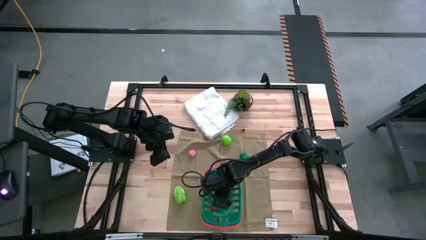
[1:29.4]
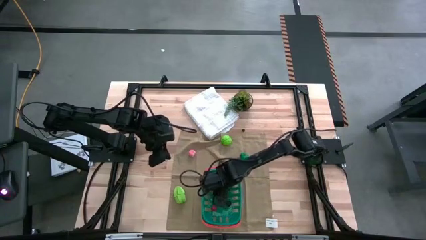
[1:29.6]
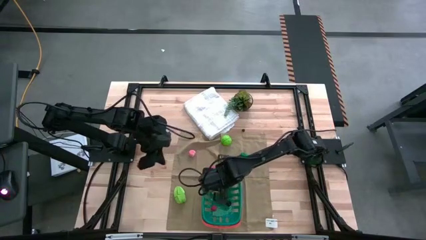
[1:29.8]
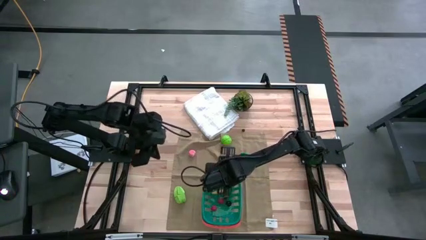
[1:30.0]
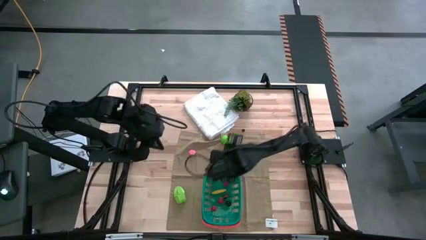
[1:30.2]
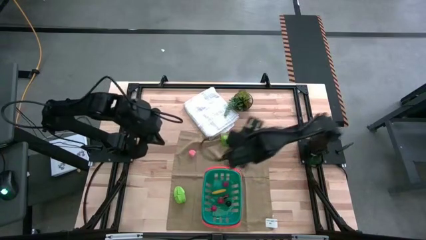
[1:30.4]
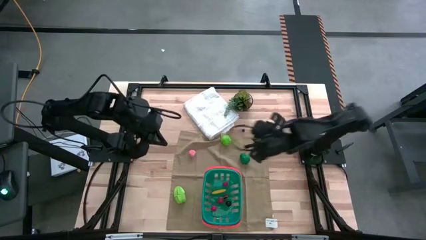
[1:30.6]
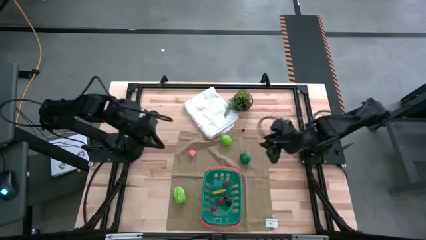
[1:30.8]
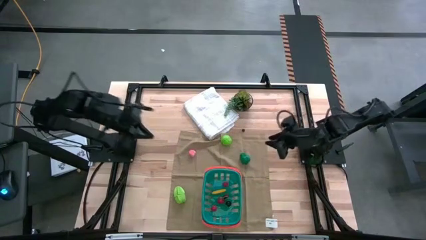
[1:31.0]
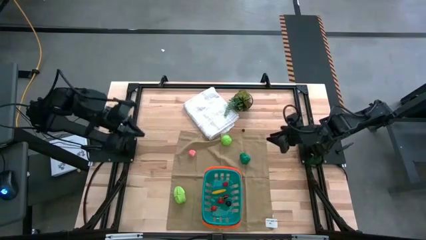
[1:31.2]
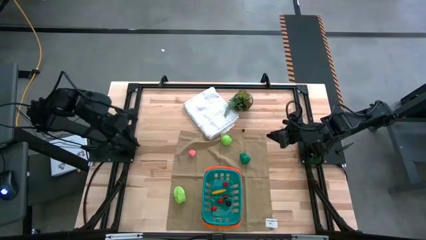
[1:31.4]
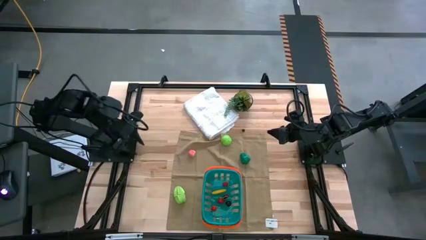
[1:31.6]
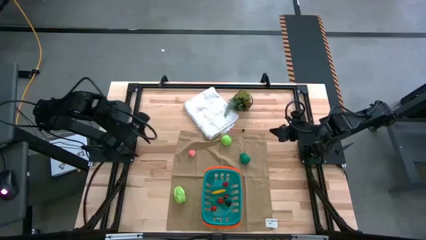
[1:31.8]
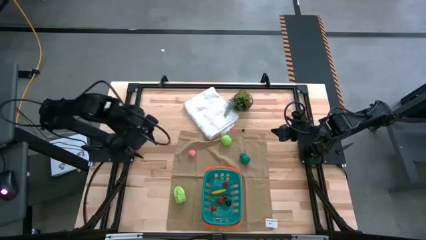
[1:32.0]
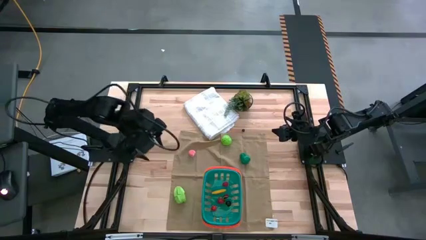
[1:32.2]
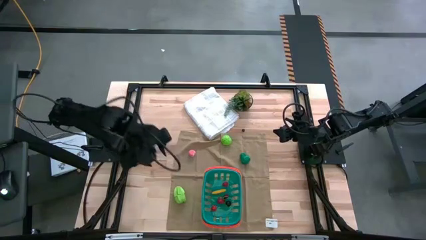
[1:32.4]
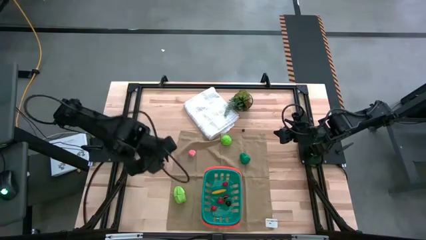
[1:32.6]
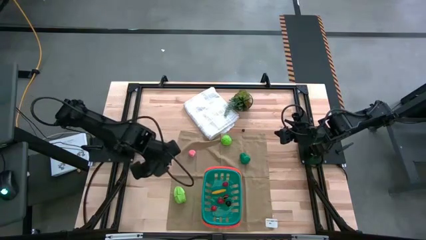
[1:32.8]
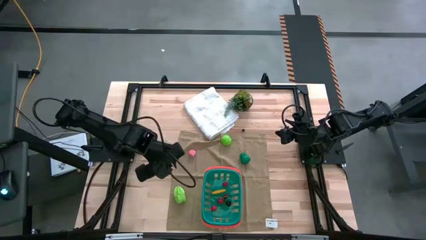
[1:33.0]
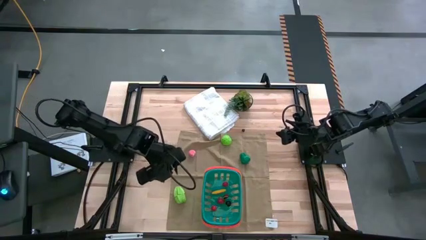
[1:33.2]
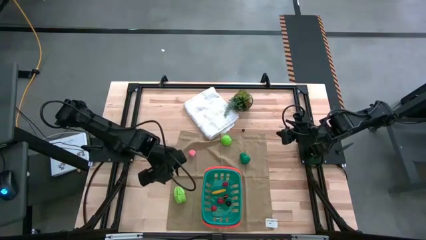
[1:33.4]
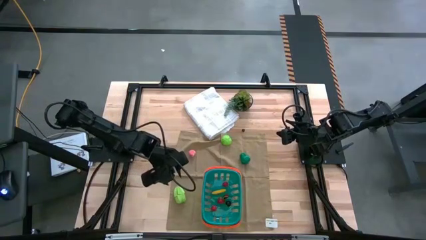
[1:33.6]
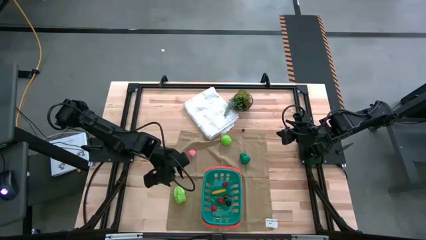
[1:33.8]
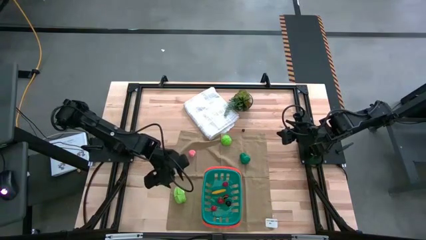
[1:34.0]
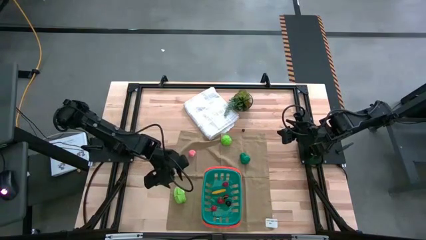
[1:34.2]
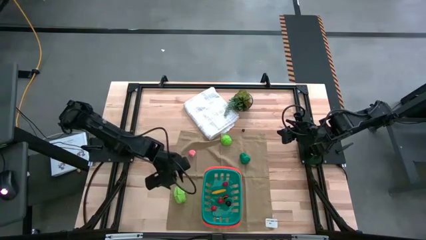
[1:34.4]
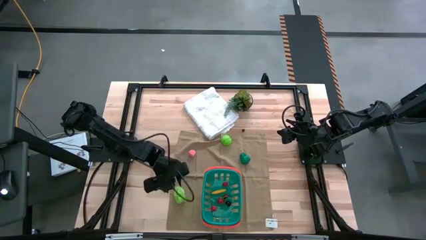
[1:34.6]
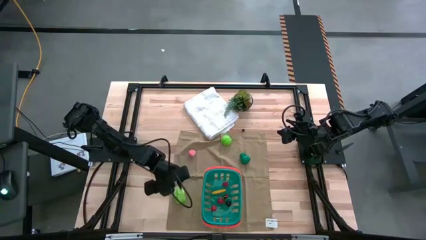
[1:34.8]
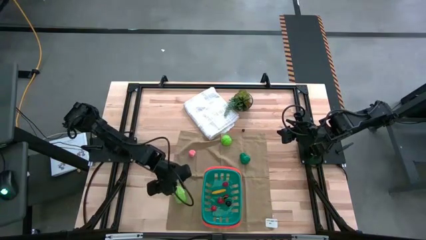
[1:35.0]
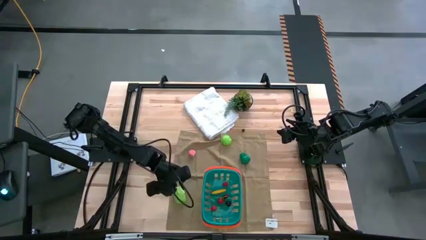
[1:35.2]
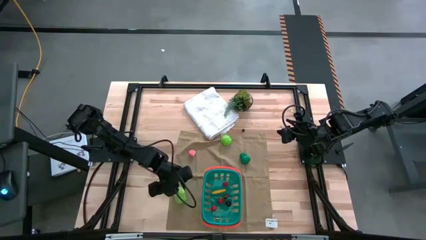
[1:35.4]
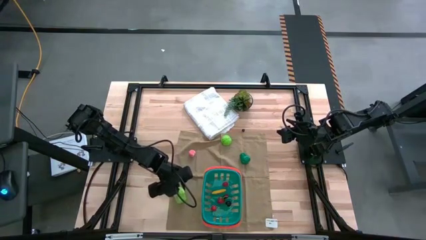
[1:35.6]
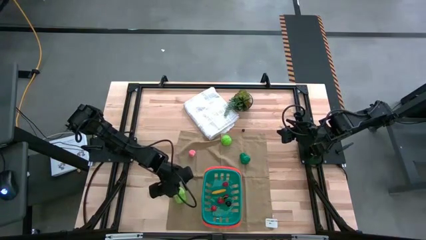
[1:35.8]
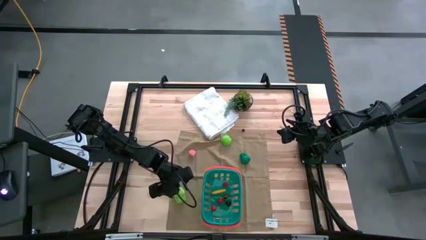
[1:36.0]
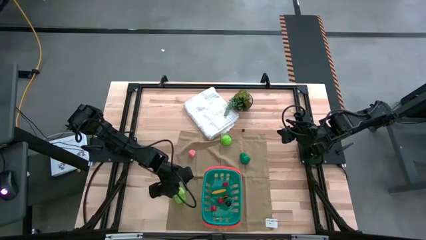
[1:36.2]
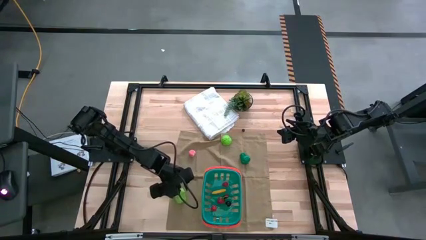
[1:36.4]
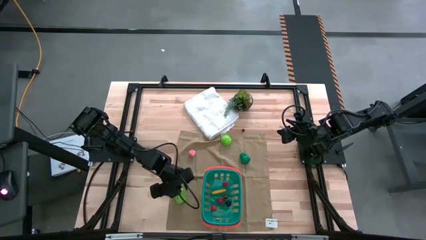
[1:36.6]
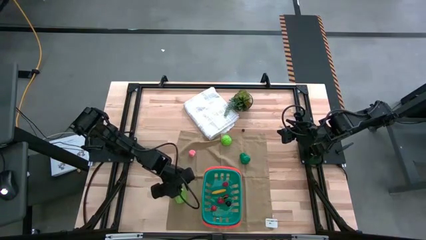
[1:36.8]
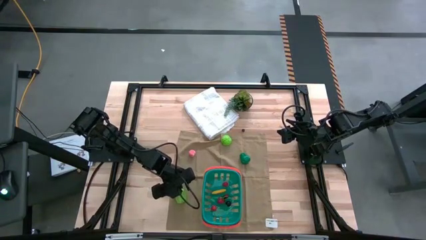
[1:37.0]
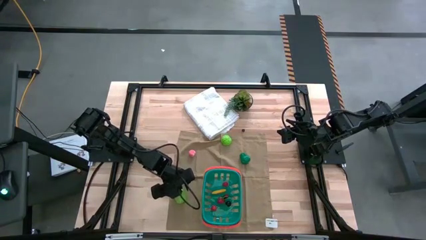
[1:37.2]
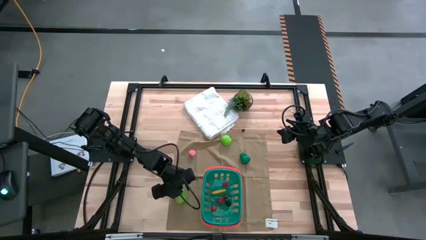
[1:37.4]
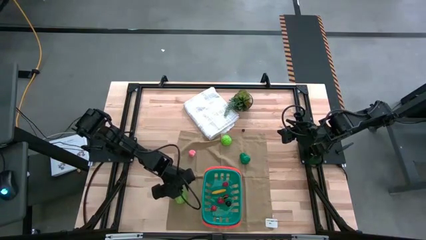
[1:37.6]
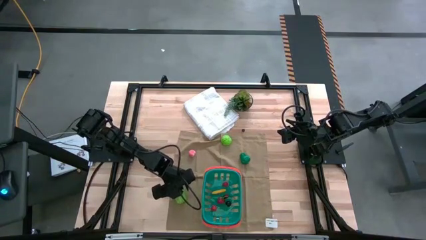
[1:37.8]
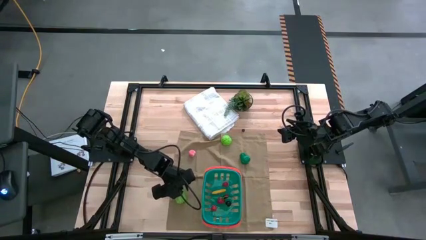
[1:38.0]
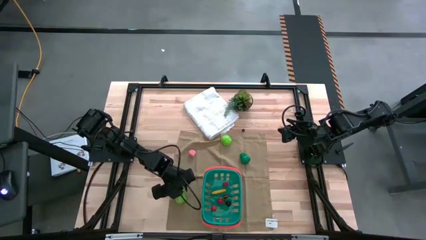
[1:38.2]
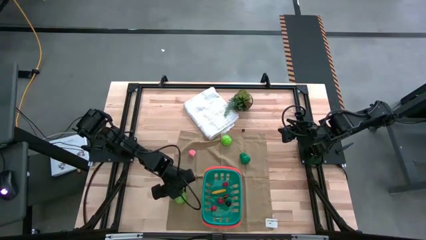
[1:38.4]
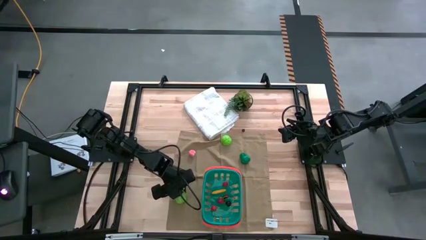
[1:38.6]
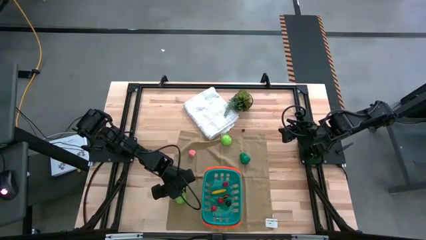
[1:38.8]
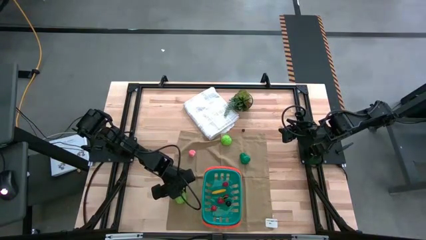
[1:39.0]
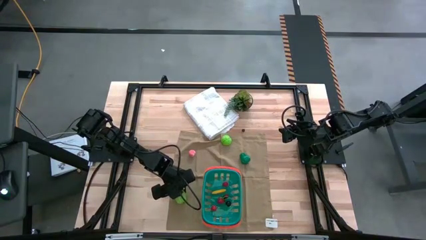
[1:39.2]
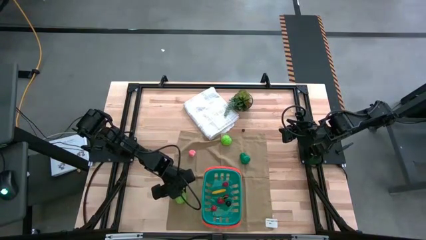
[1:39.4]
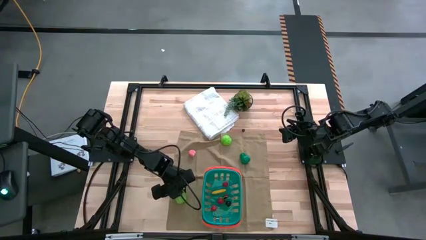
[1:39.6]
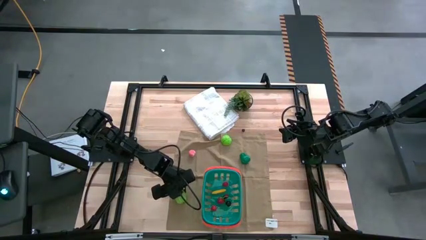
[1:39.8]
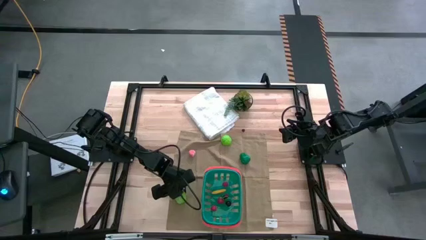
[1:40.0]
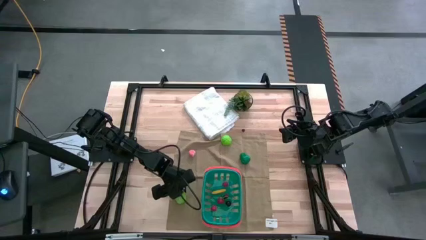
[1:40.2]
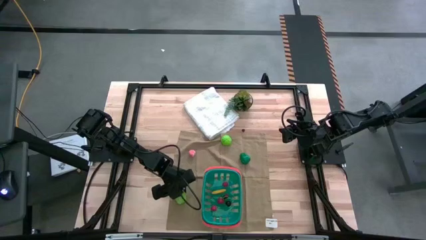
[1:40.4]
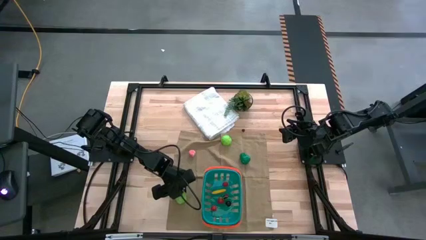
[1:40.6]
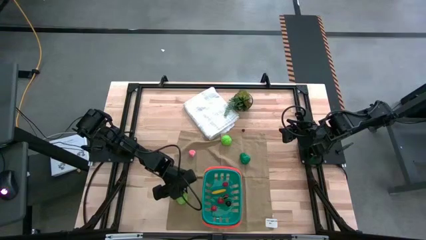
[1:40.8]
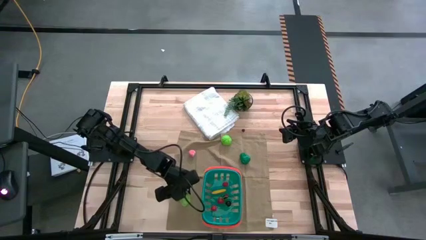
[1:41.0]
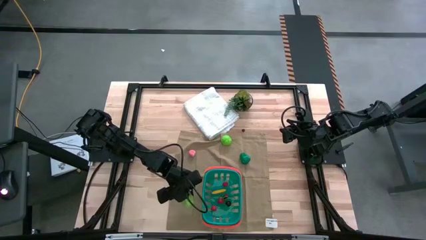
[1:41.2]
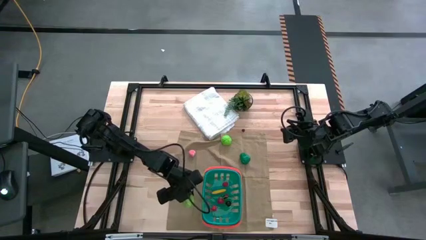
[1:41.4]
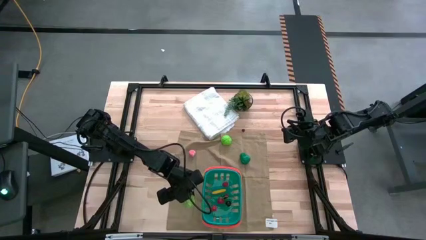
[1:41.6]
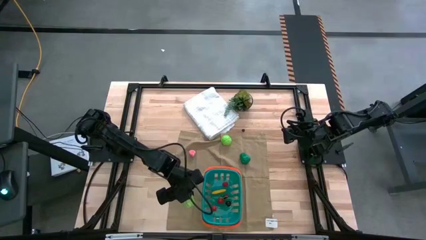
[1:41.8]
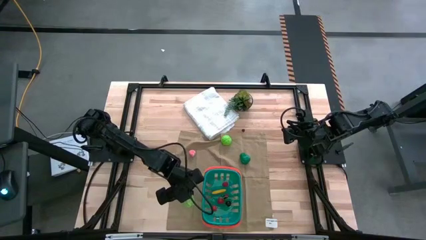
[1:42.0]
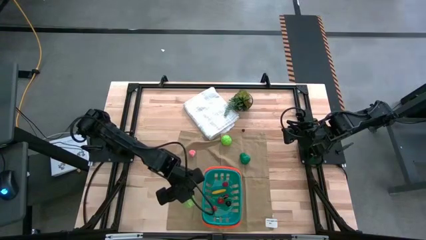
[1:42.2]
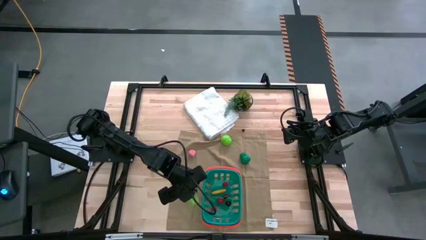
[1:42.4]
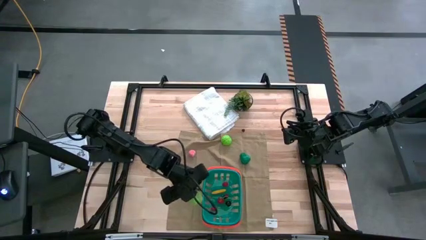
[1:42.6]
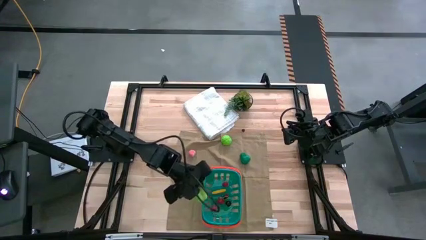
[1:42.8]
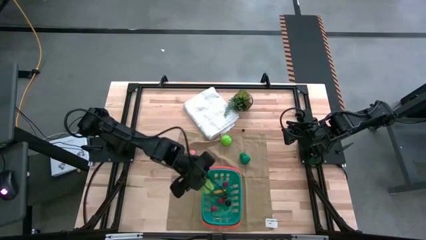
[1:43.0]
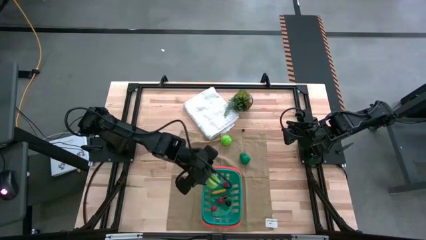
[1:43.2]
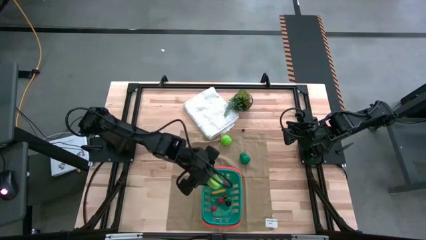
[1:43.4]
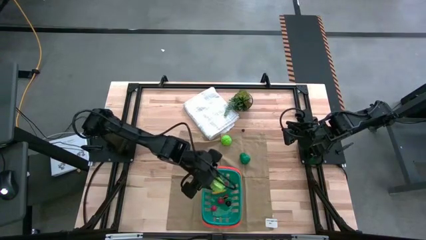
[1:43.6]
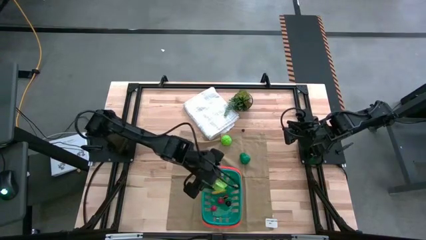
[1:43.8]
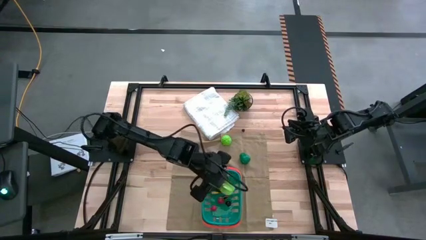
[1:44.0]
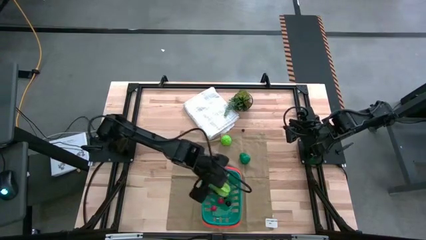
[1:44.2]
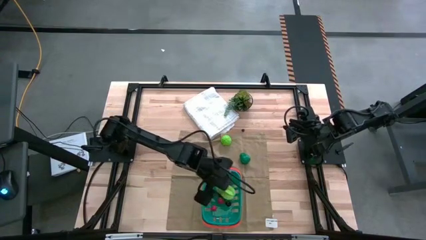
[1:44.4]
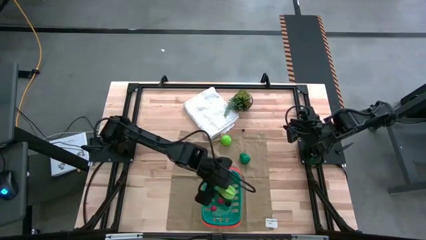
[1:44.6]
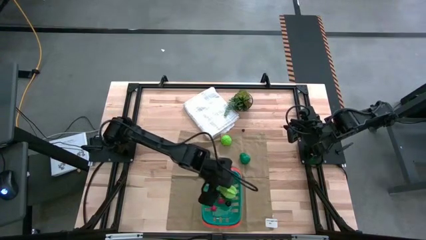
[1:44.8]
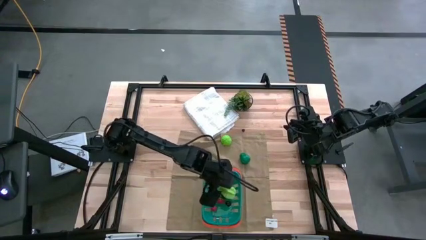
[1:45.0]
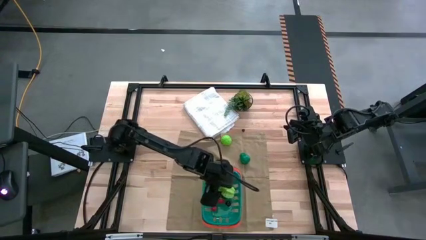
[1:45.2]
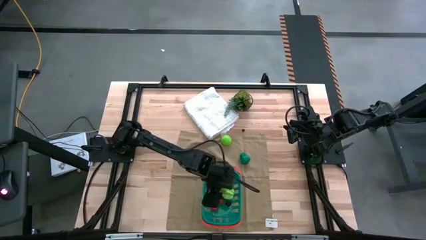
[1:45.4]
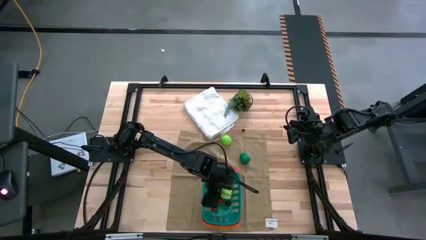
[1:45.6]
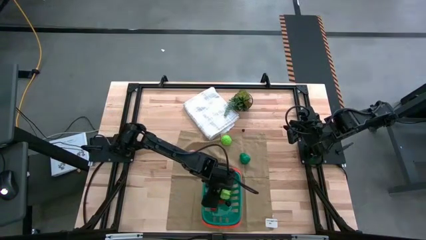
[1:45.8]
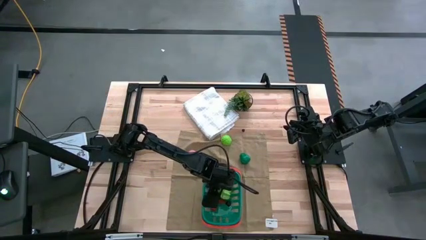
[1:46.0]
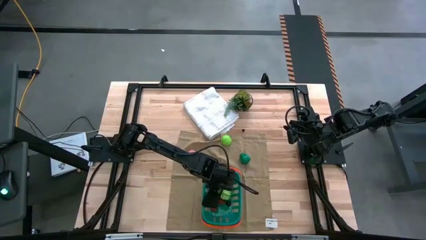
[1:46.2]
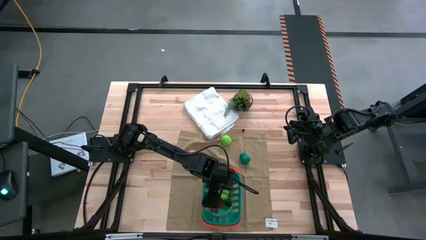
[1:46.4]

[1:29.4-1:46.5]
Task: Pick and placing Produce into tupperware
Put the green starfruit into the blue bin
